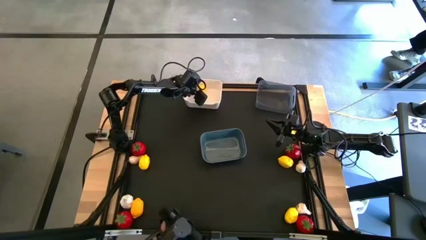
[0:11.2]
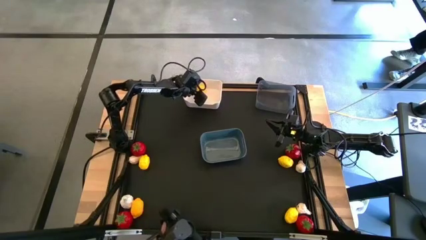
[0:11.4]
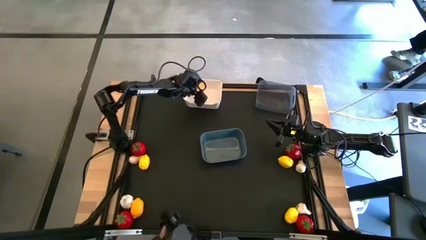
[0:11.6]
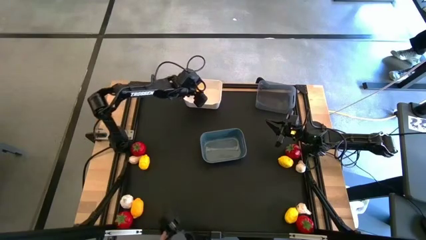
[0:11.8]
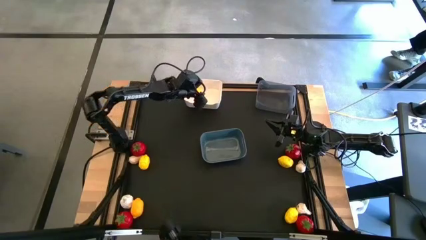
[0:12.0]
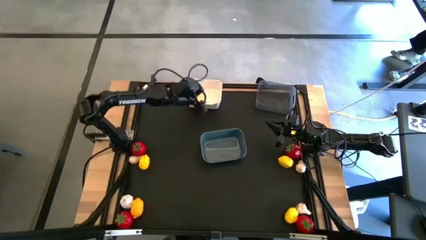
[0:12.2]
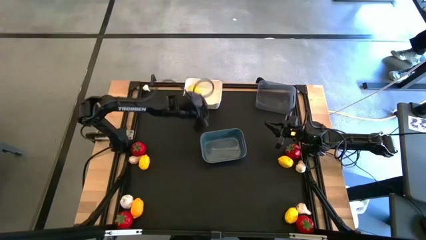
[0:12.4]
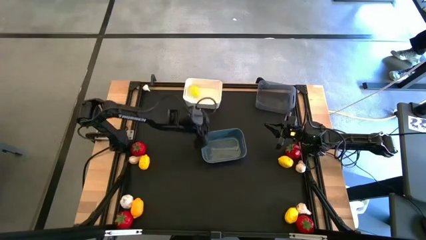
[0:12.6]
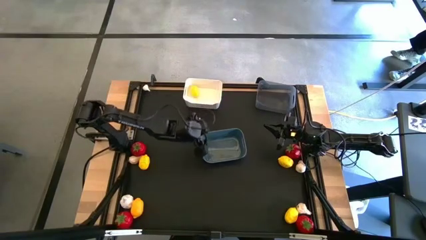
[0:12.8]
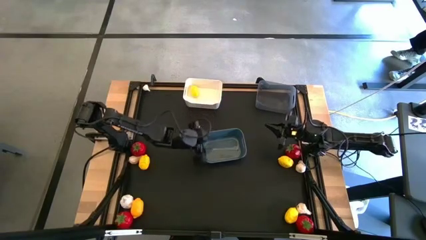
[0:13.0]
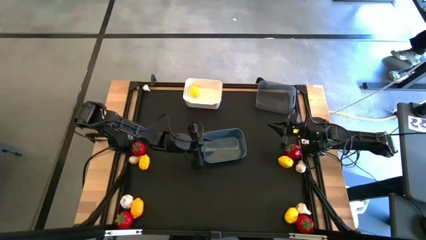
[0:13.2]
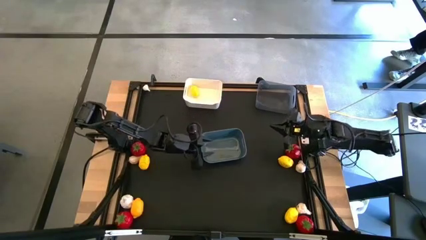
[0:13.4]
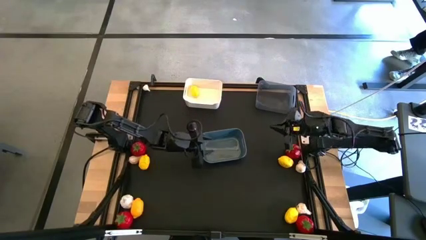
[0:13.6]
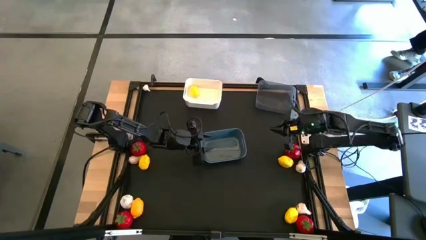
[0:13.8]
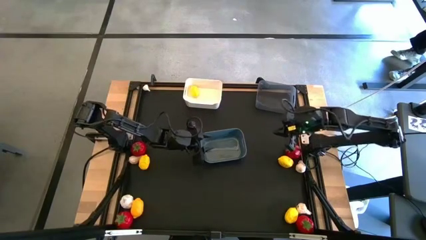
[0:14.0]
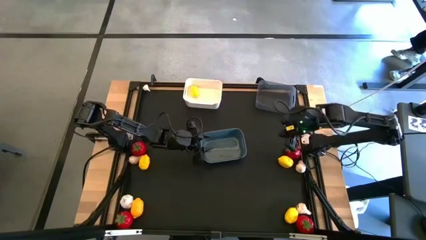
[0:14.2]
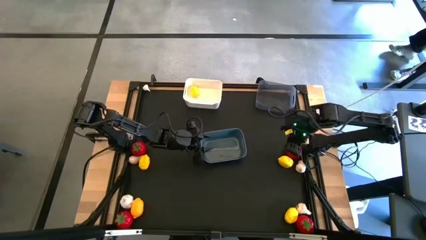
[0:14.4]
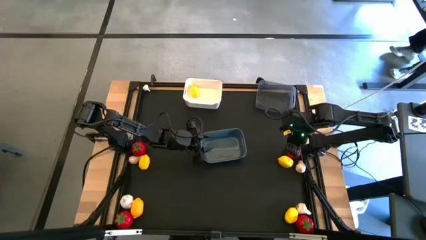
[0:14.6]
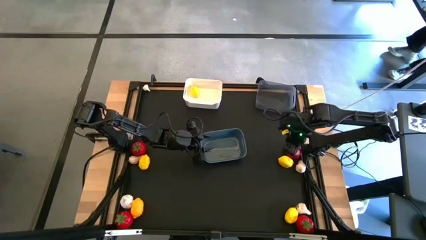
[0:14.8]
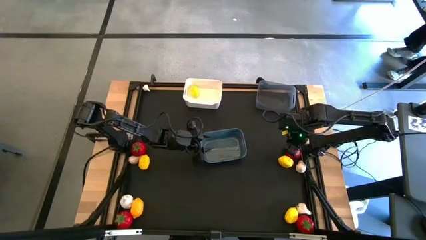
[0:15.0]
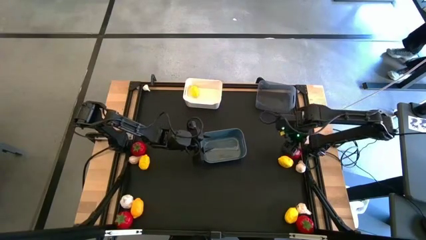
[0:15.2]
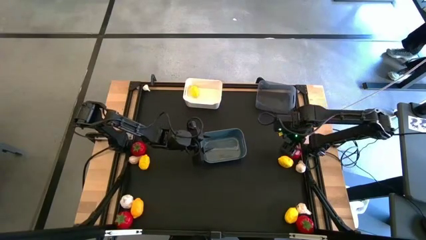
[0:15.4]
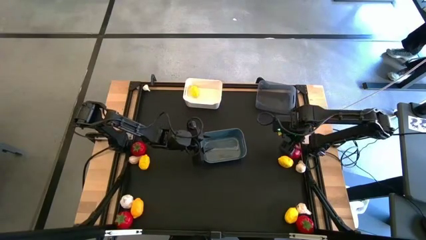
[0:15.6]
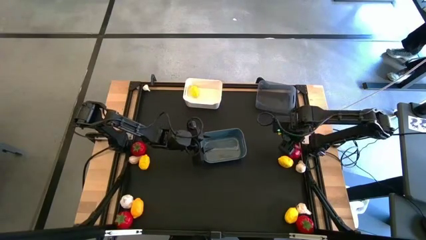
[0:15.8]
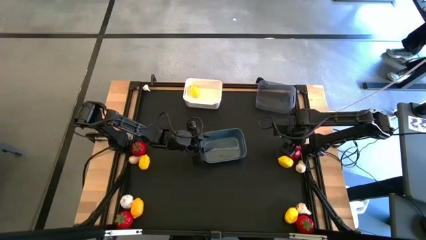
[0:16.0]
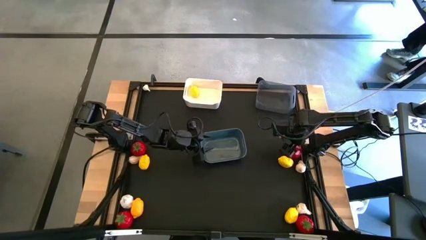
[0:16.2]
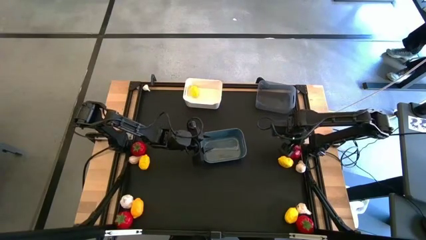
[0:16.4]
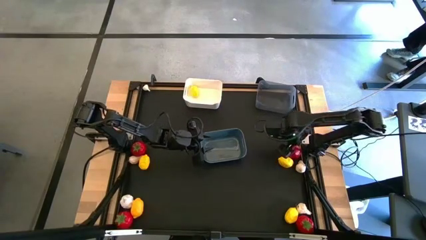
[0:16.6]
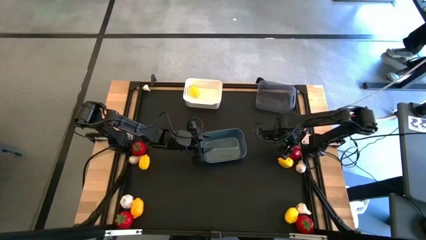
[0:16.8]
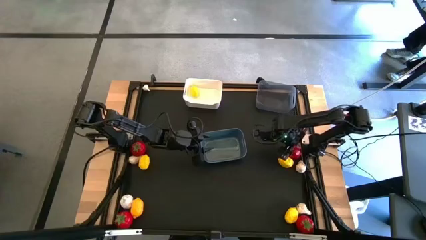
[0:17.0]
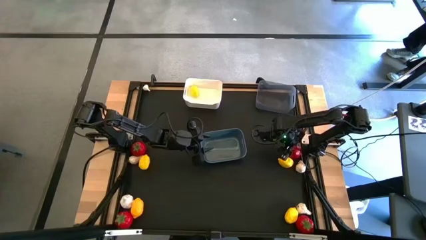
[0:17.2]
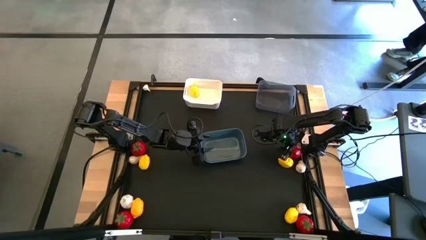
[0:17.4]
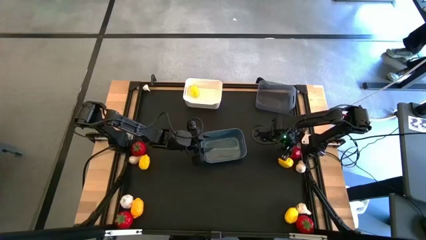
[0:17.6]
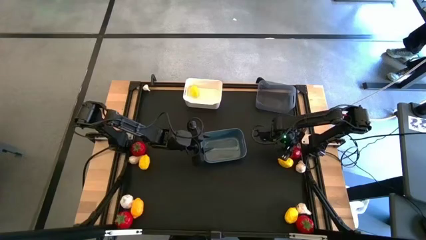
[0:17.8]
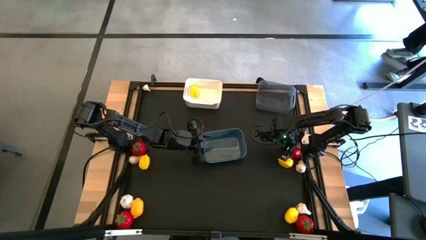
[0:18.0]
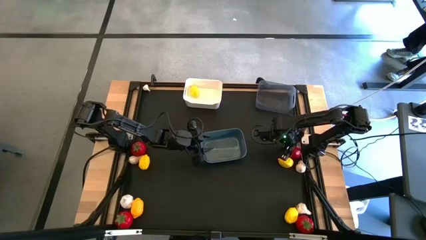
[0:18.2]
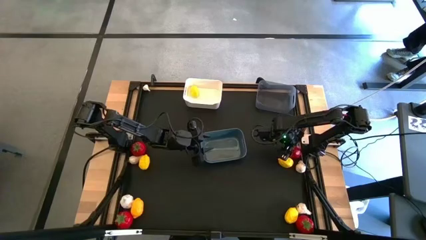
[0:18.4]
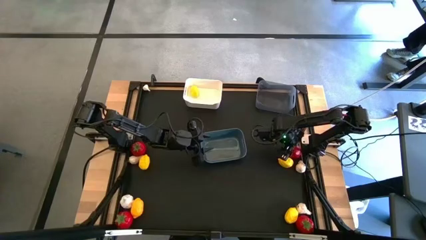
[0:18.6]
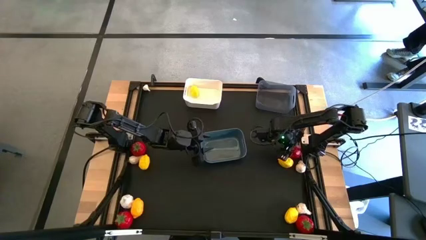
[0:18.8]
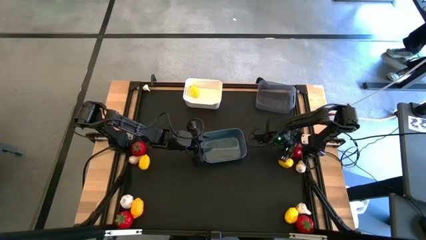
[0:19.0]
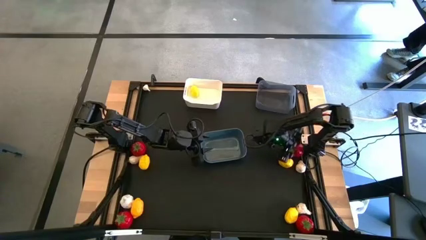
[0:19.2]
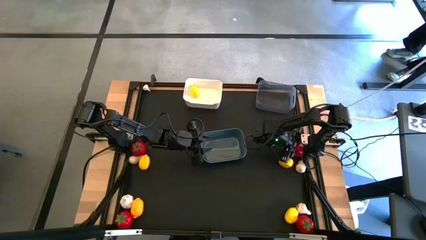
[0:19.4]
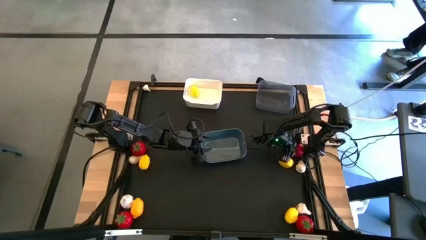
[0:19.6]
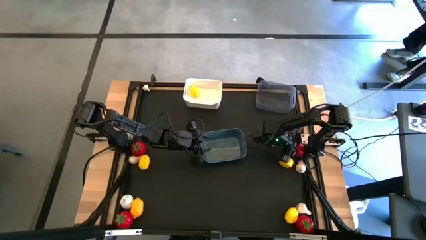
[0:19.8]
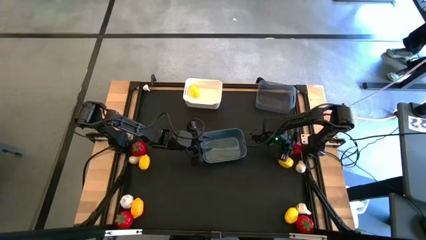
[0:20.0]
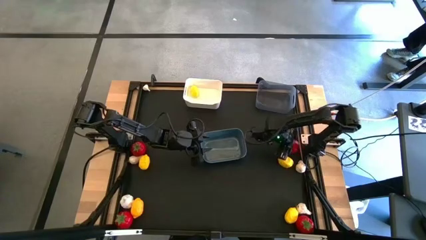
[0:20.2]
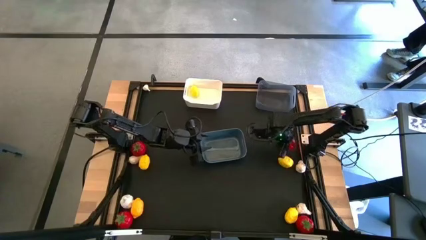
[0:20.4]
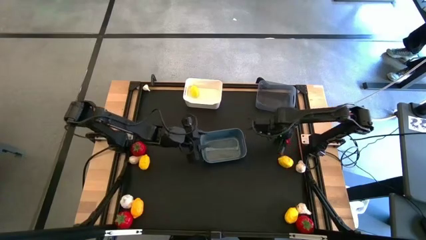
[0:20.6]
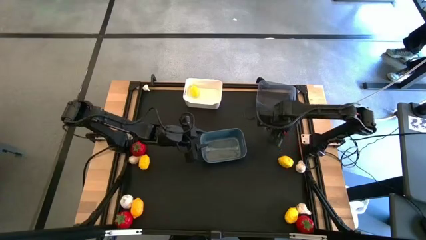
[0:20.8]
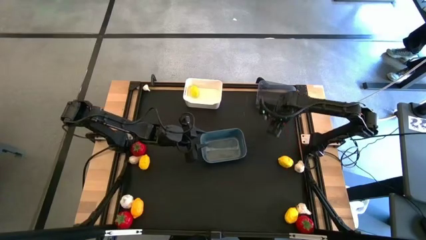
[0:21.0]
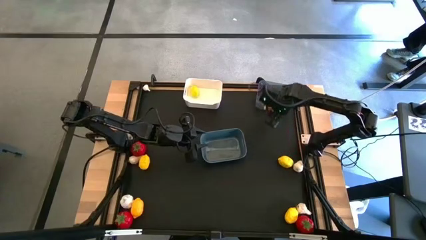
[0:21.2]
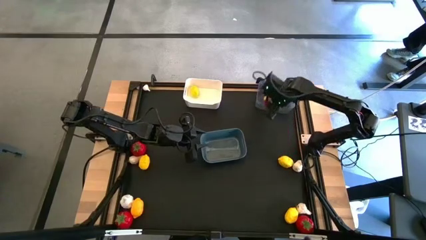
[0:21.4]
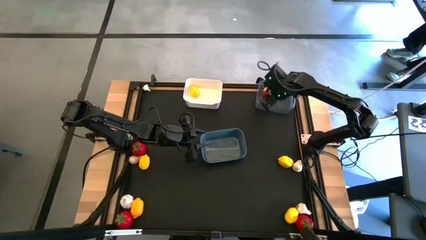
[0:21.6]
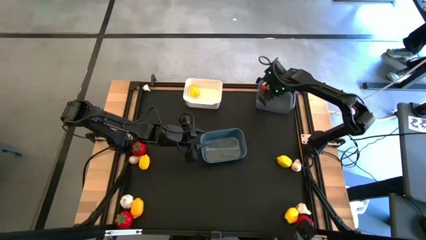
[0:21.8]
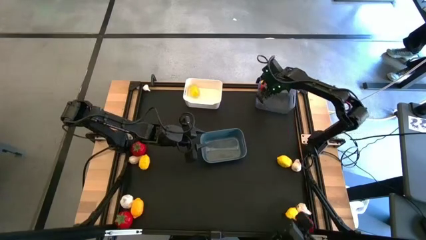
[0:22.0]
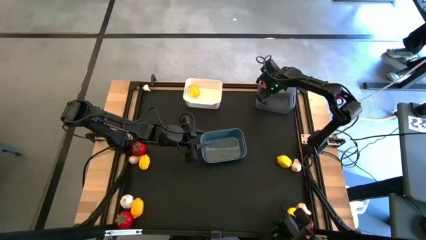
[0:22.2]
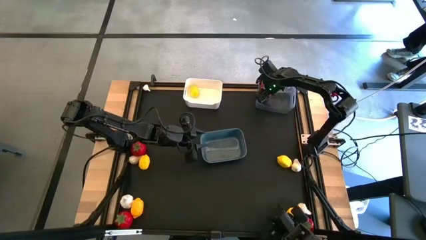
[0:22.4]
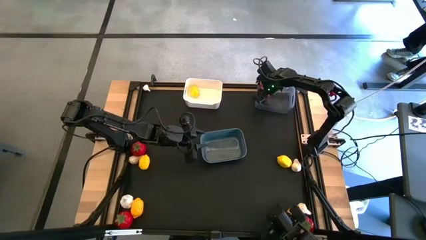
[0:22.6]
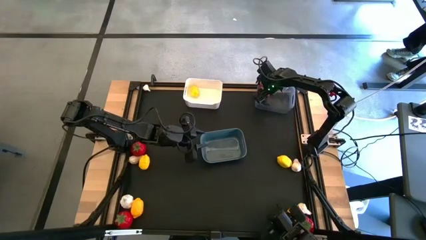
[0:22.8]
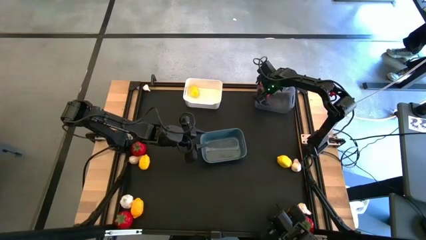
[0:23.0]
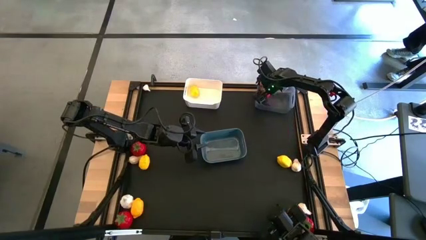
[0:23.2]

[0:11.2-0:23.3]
Task: Sort produce into baskets
Put the red tomato into the black bin
